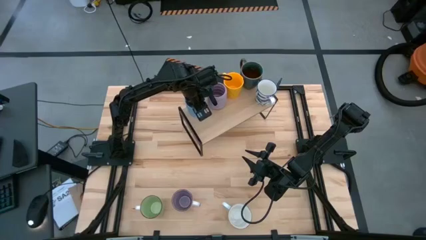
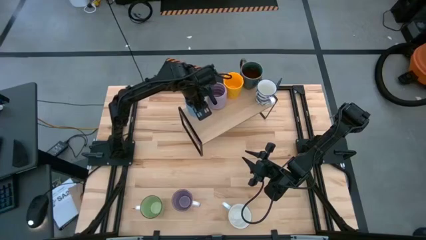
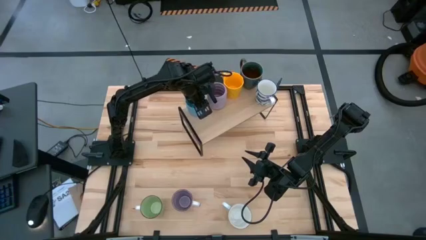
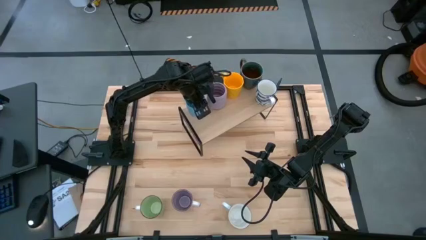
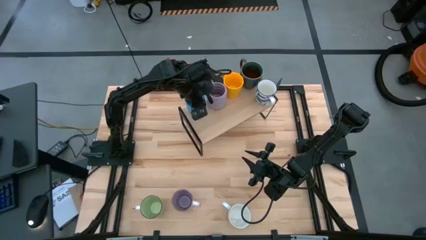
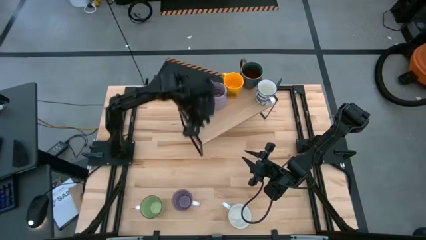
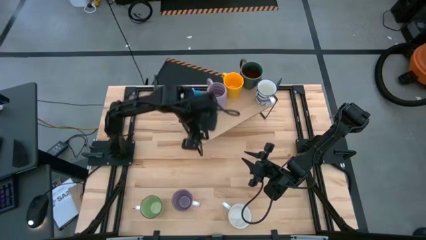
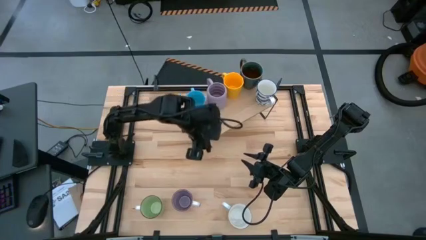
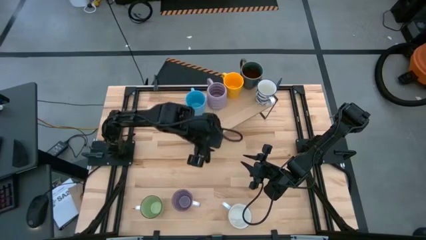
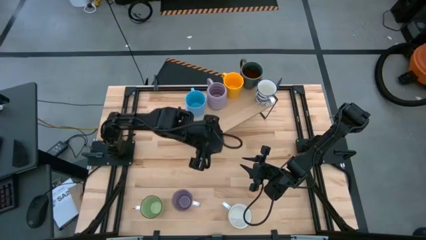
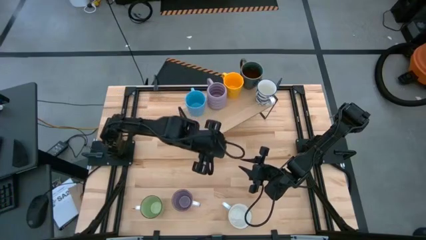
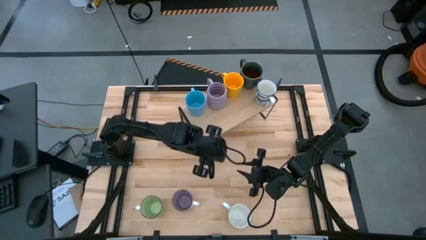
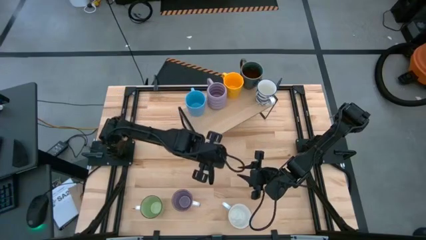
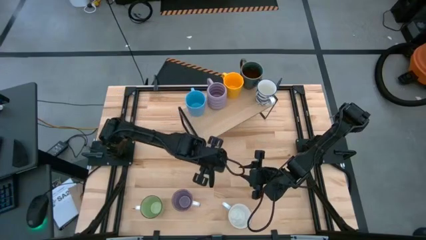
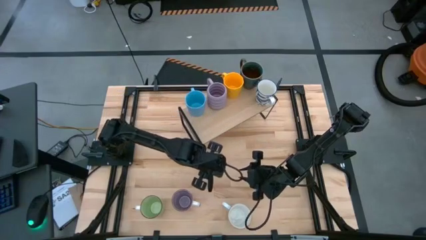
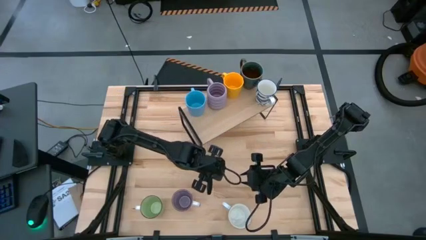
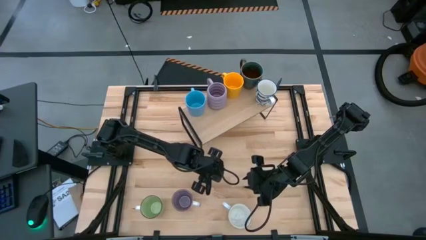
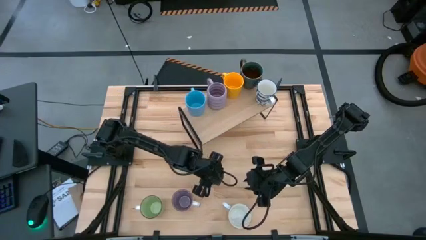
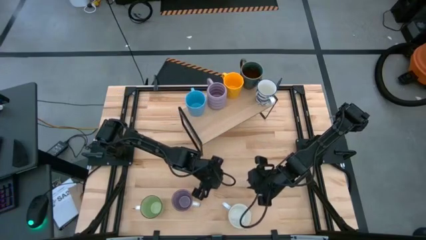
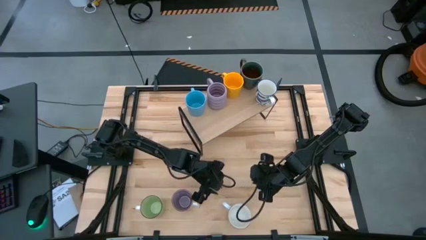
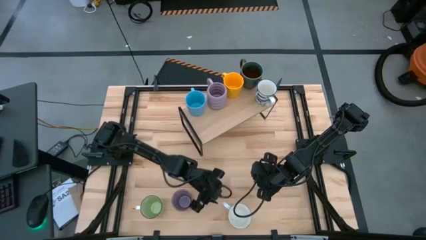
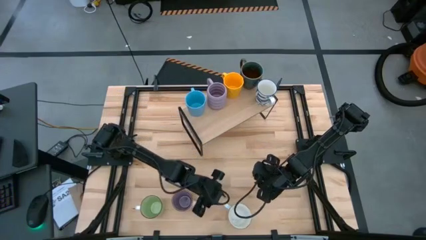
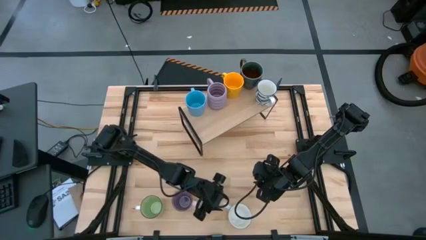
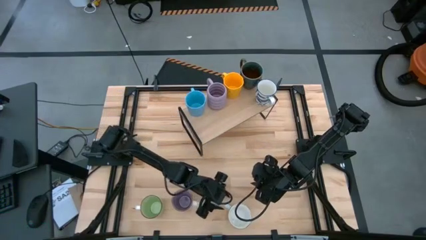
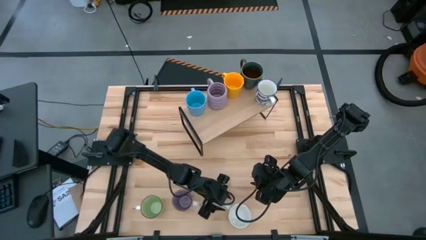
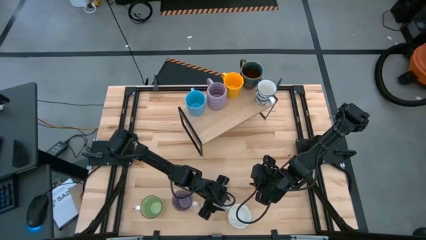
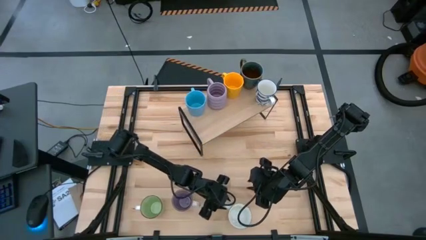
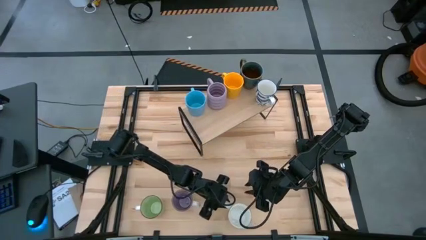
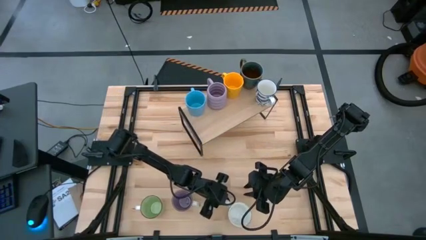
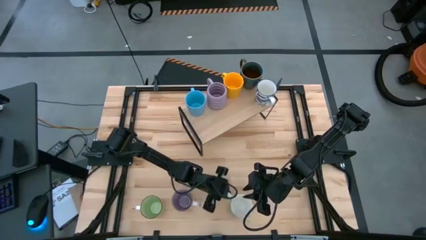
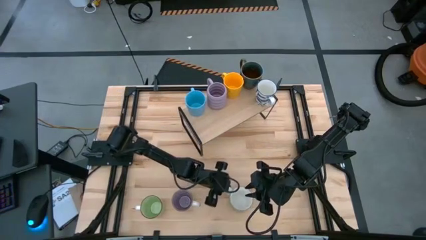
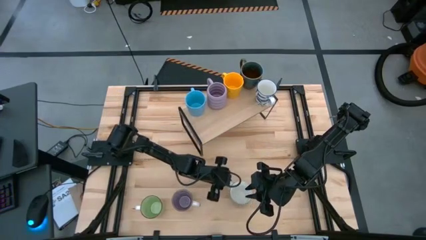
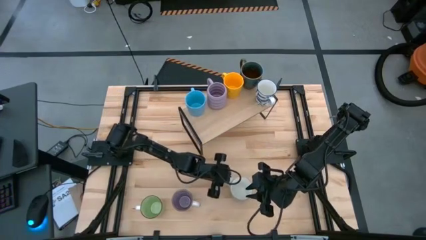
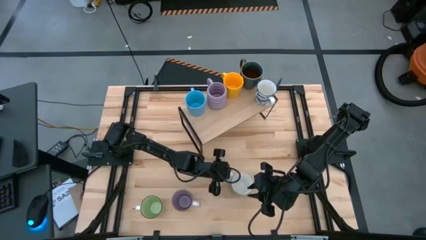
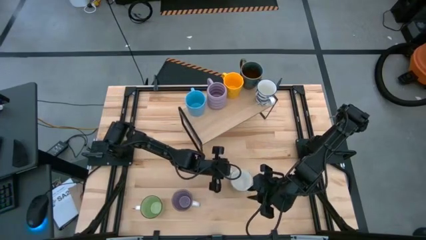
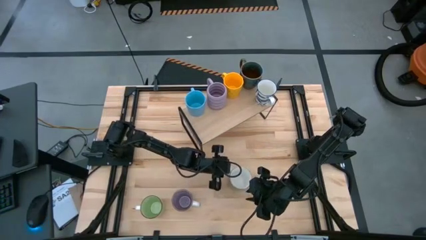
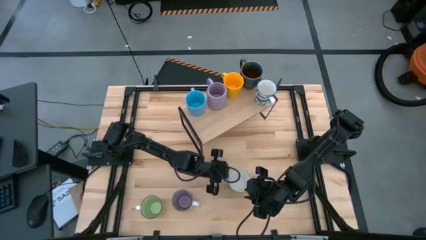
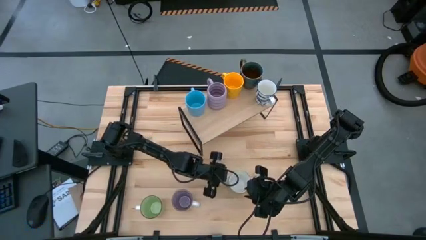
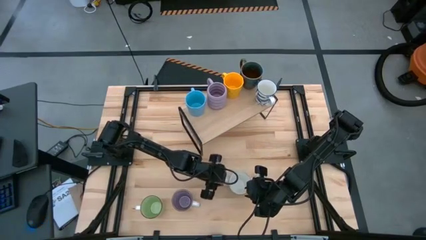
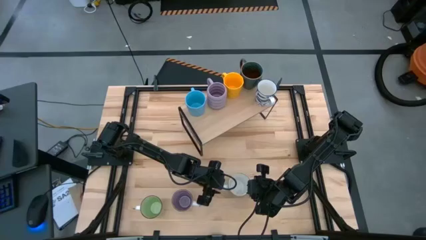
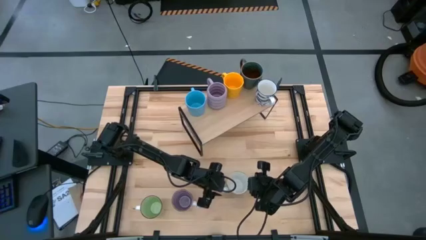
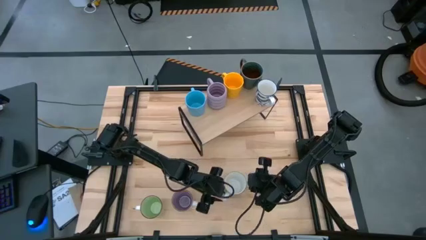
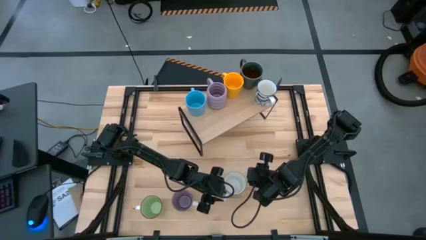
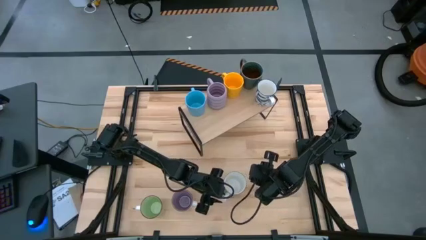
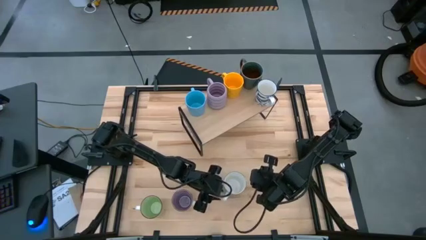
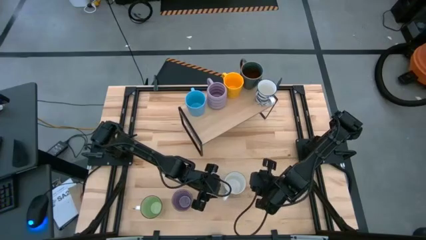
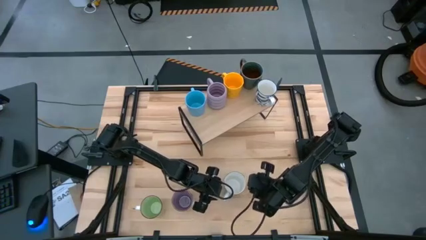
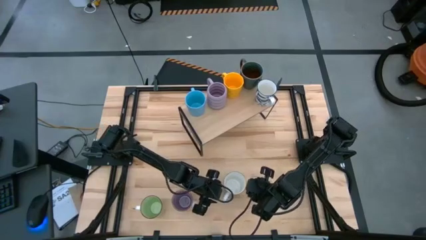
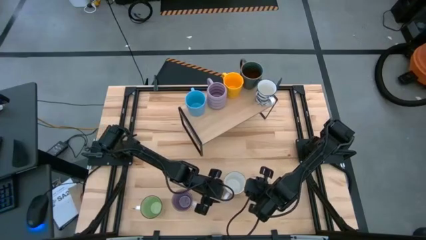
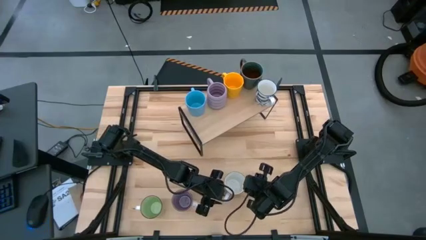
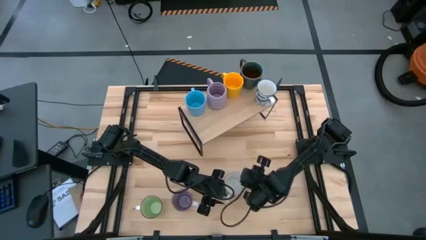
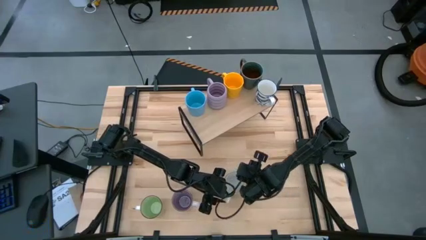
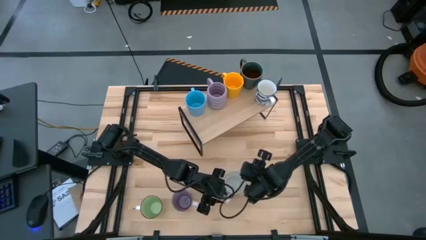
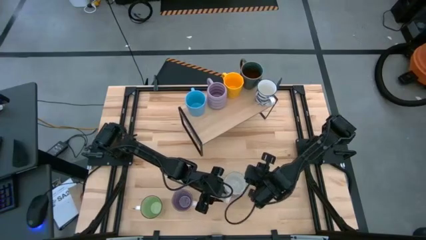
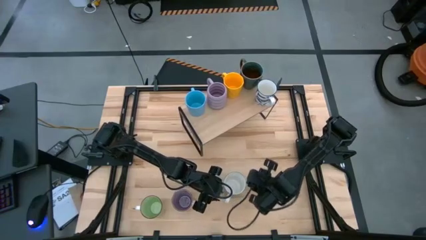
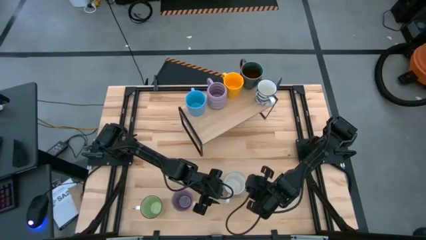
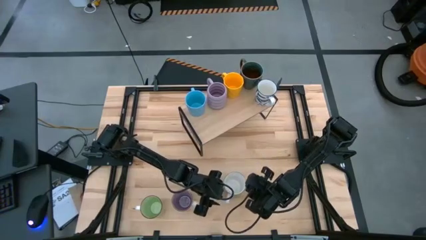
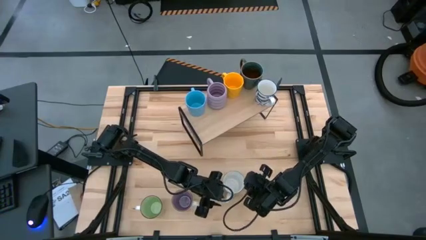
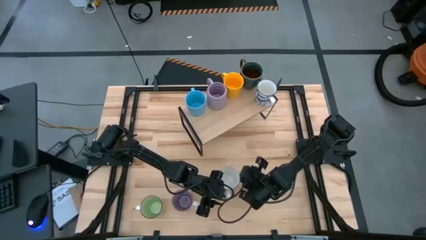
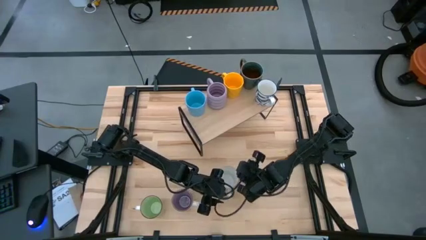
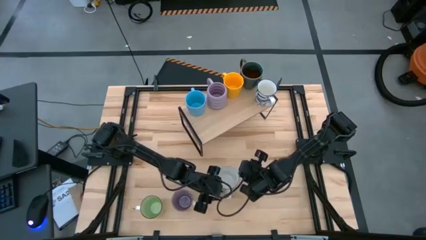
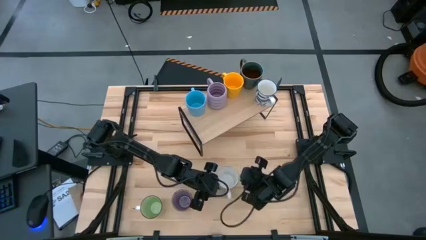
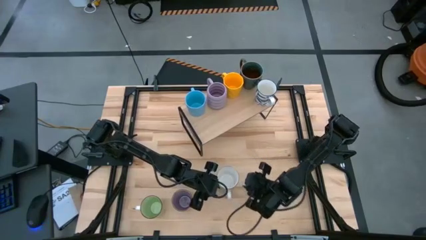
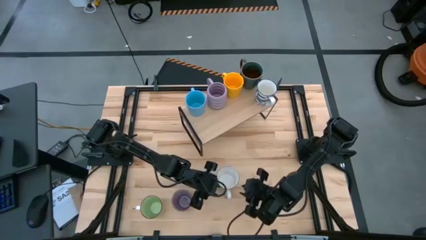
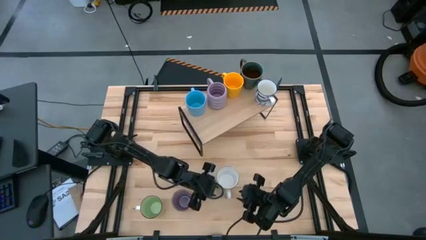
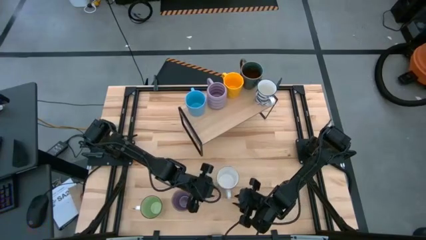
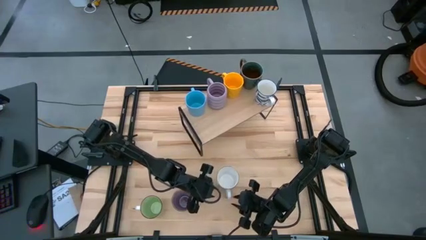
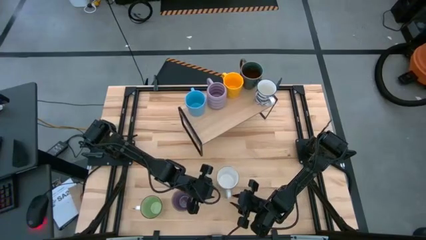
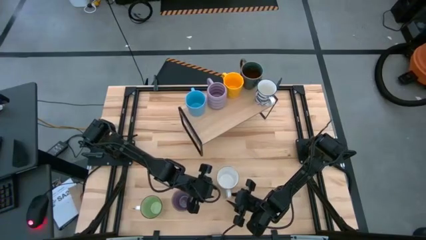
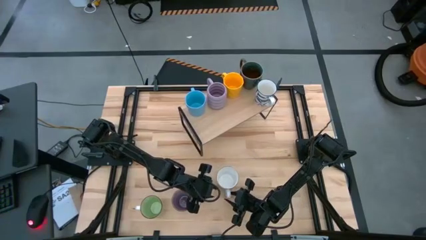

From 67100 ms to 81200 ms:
Task: Place coffee mugs
Put the light green mug on the shelf
